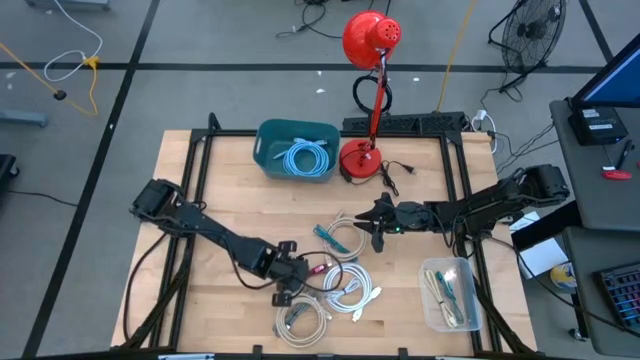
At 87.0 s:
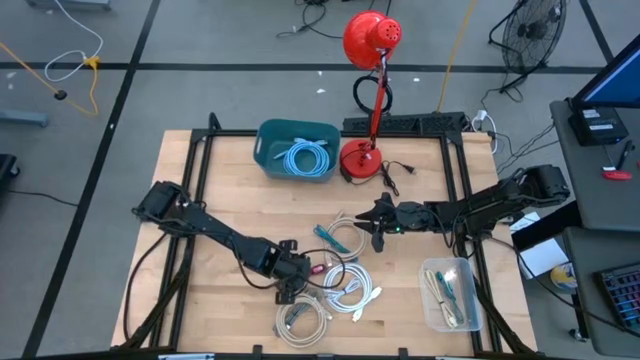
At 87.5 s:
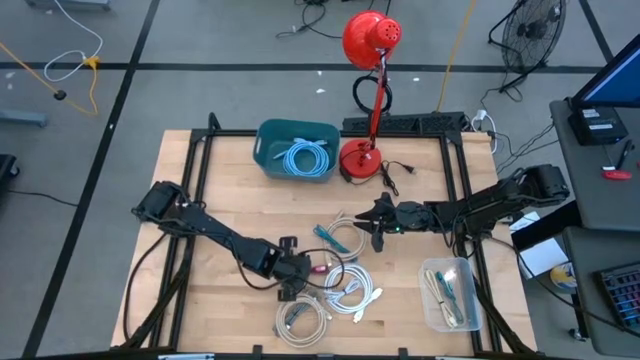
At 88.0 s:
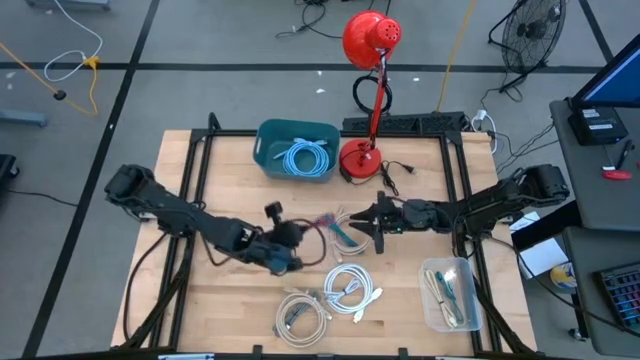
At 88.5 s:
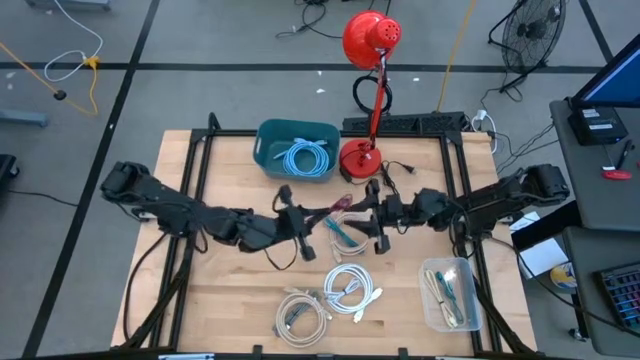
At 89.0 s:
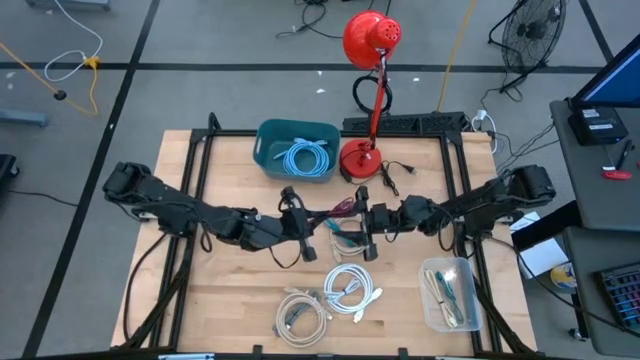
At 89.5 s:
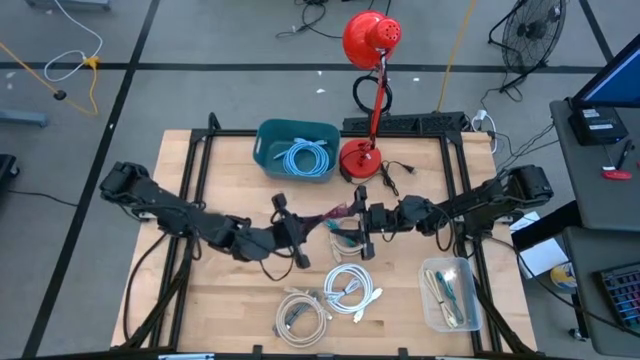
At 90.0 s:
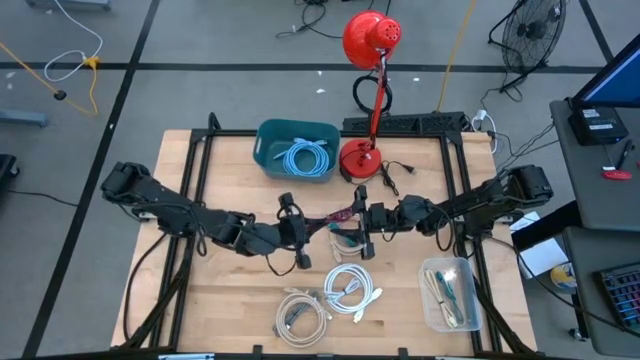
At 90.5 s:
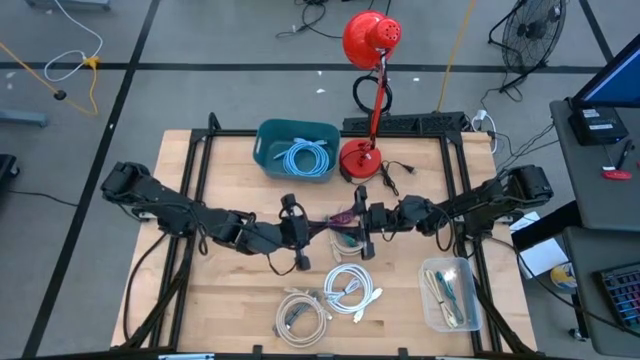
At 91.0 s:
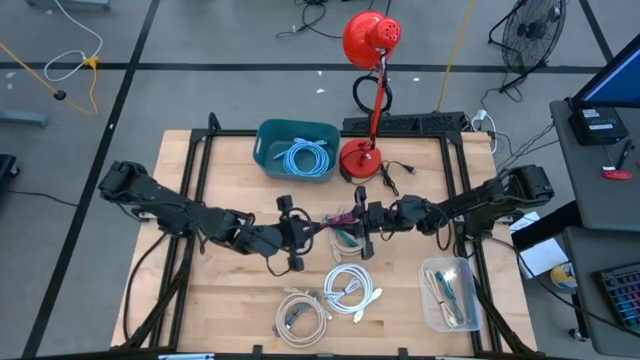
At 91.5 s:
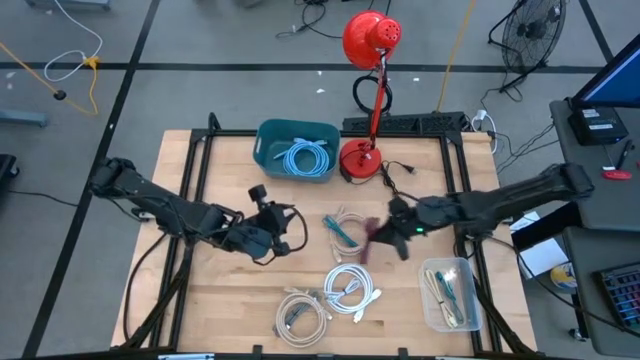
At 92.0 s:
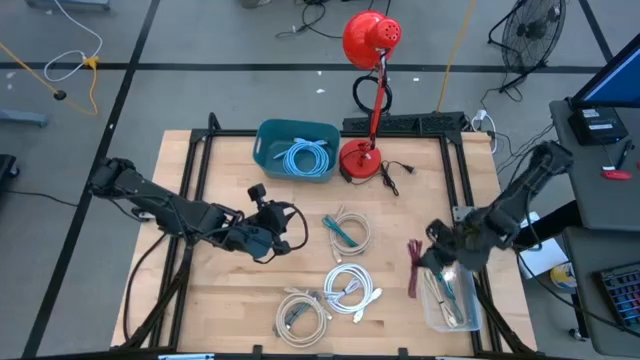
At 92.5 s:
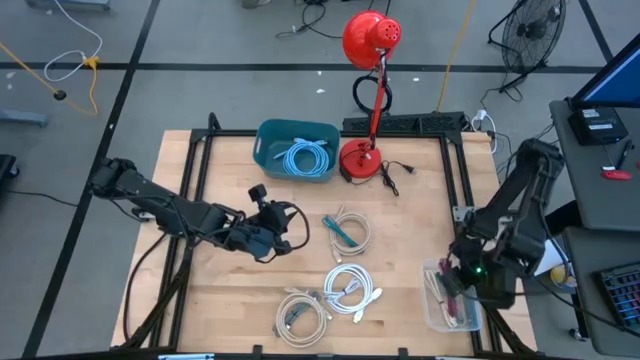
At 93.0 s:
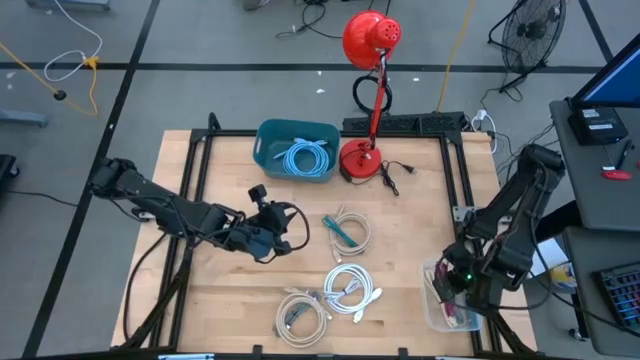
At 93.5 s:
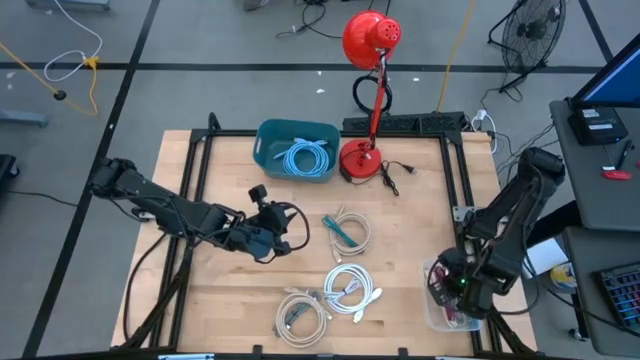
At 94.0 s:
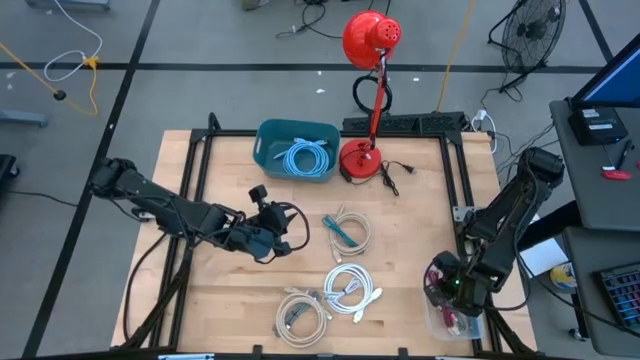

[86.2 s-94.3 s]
Task: Pick & Place USB Port
Put the red charger cable into the transparent bin

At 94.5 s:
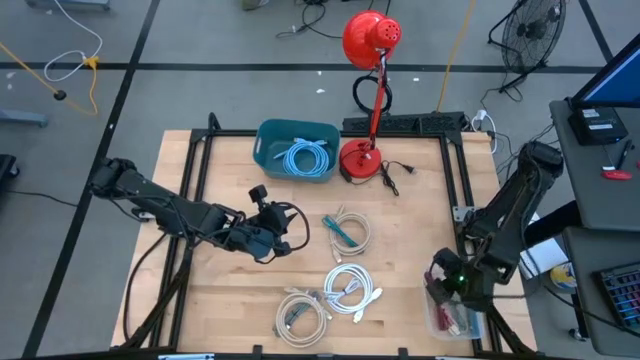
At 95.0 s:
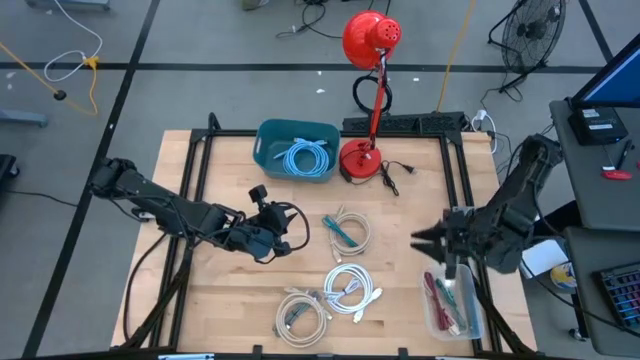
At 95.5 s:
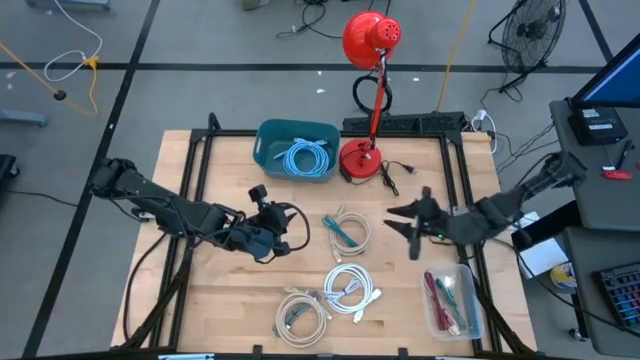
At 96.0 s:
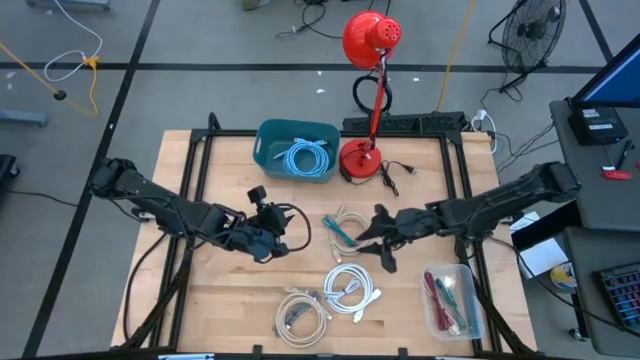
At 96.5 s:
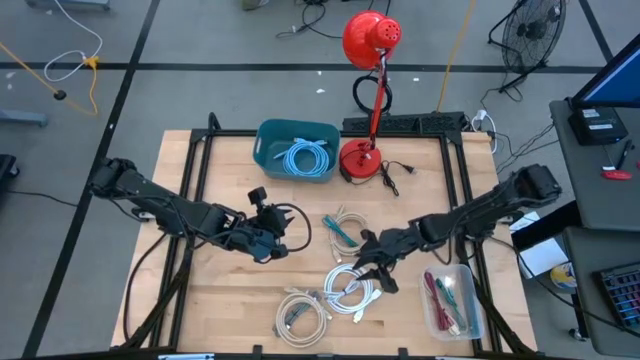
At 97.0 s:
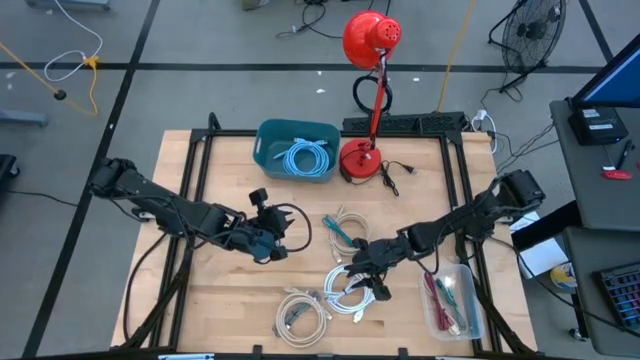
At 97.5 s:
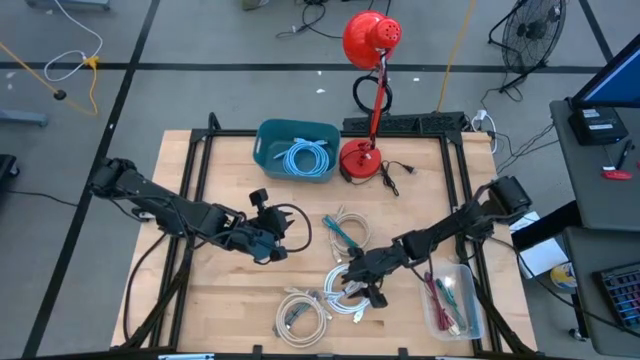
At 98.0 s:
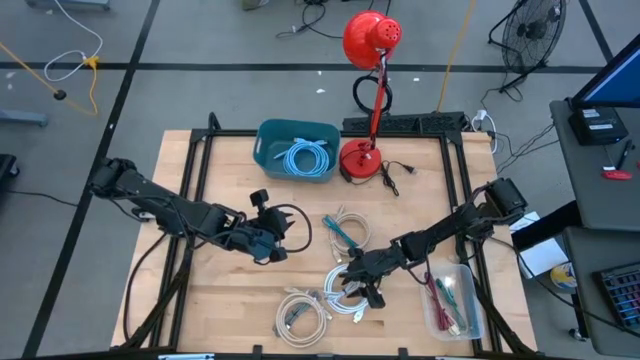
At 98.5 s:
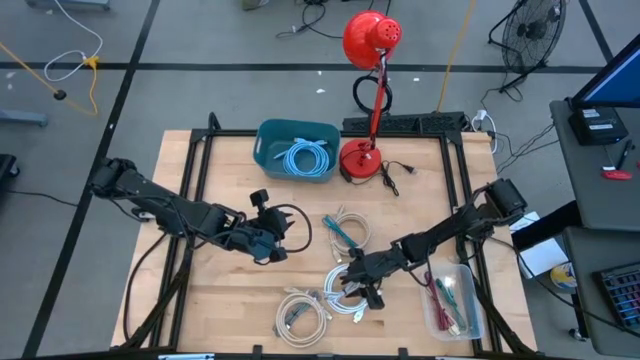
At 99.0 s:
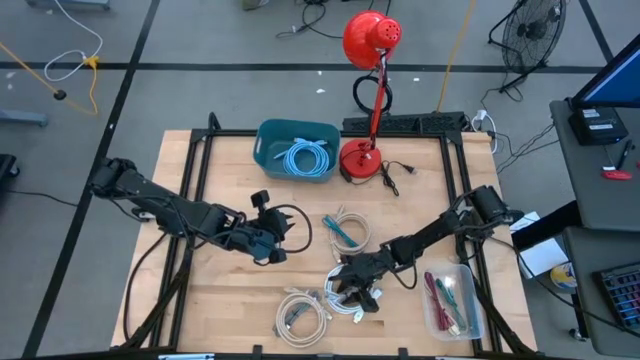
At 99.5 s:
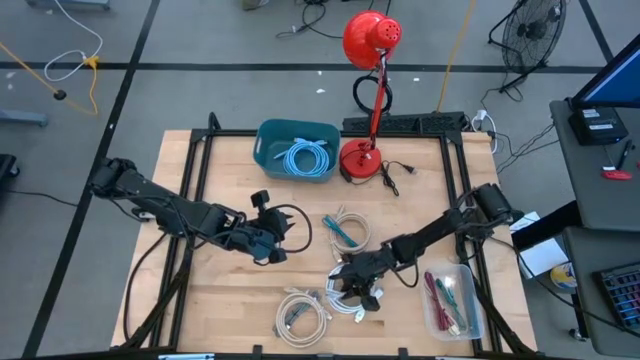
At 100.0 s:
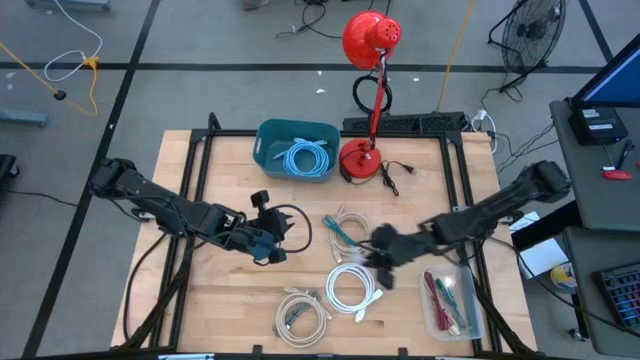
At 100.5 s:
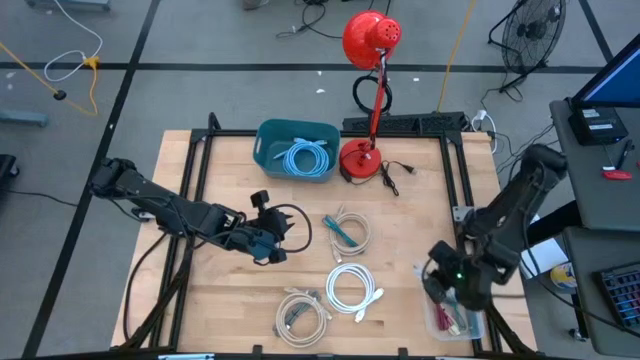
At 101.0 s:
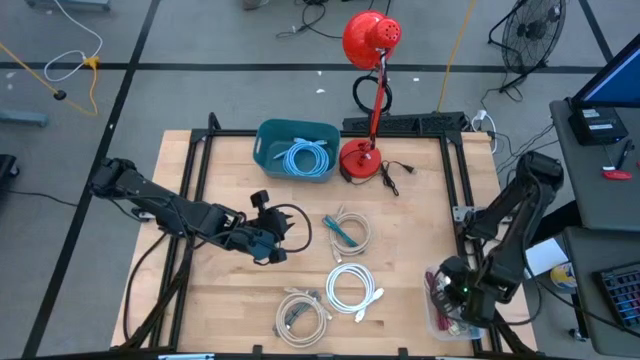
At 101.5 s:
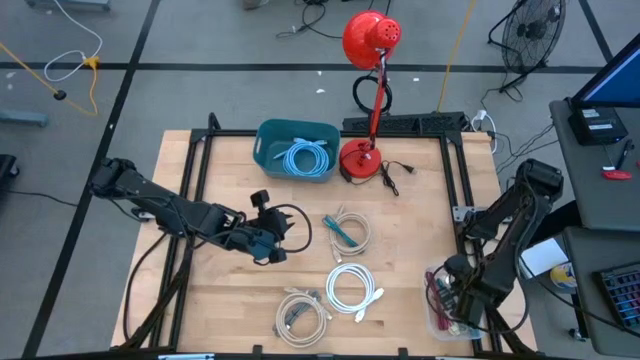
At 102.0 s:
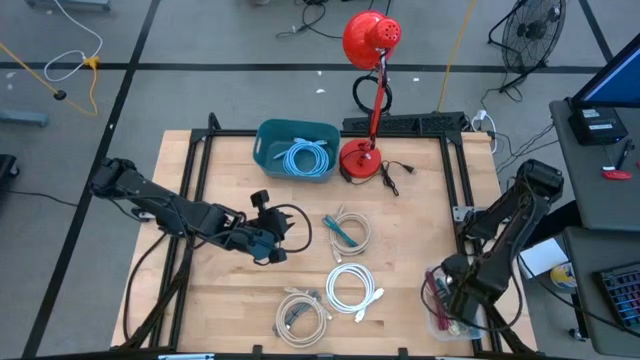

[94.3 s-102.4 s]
Put the white charger cable into the transparent bin

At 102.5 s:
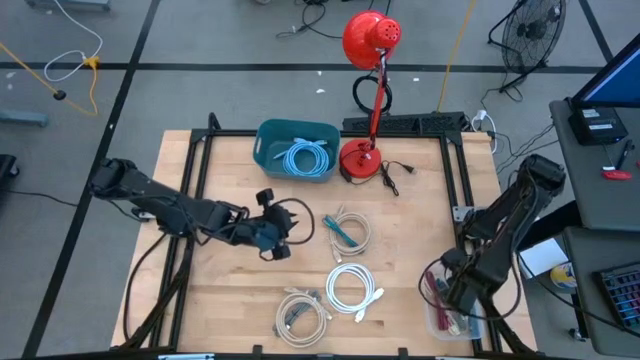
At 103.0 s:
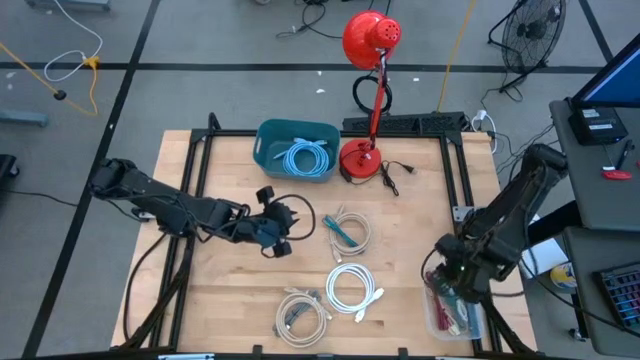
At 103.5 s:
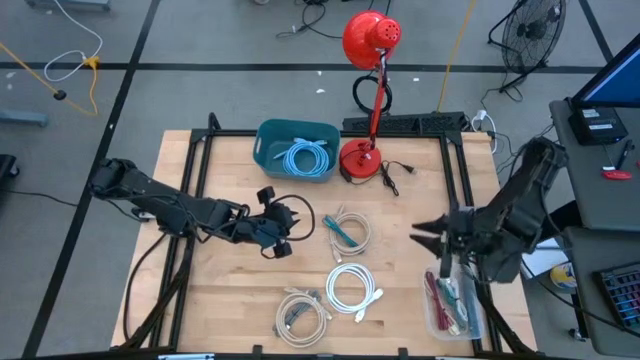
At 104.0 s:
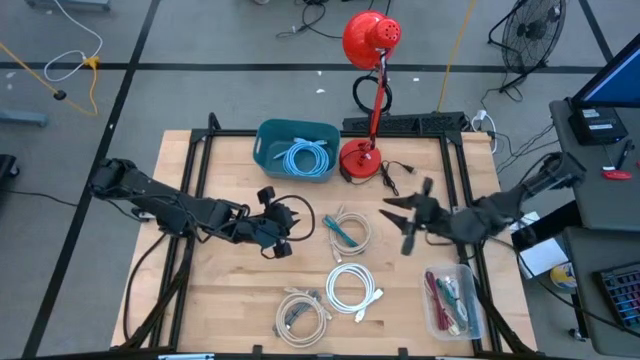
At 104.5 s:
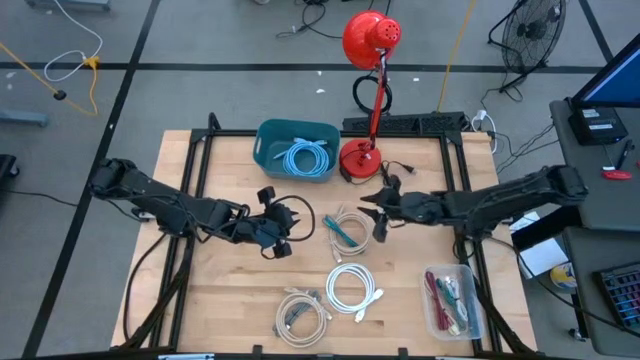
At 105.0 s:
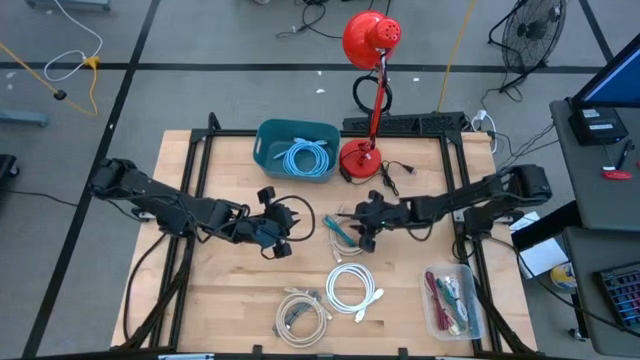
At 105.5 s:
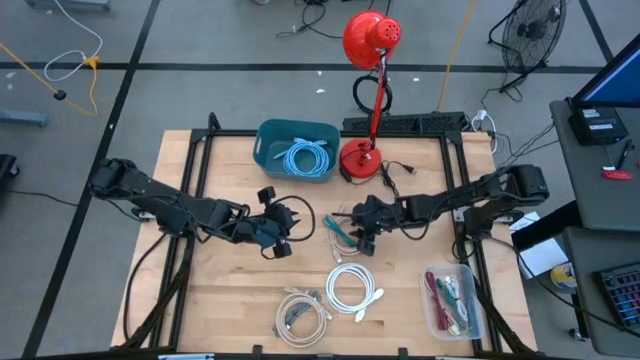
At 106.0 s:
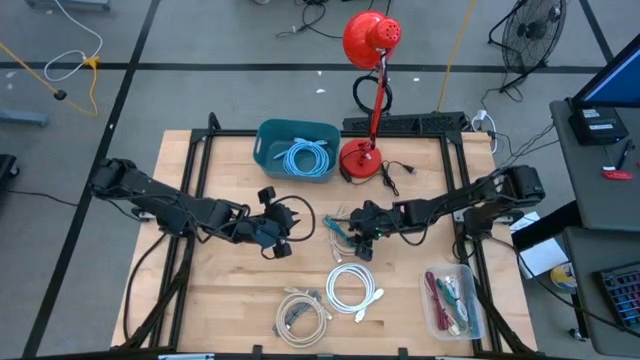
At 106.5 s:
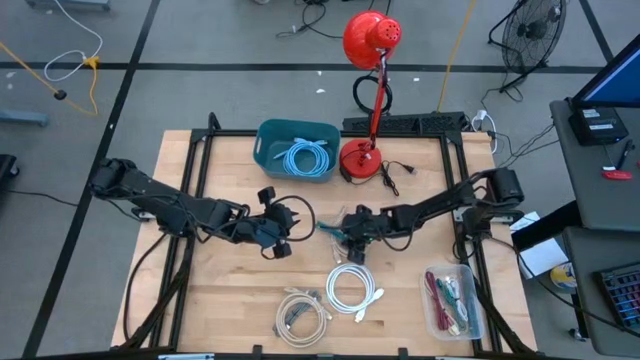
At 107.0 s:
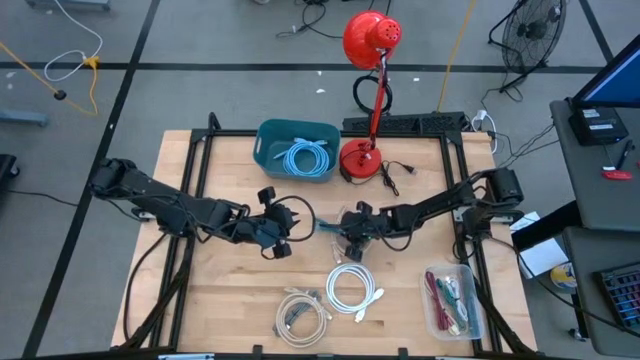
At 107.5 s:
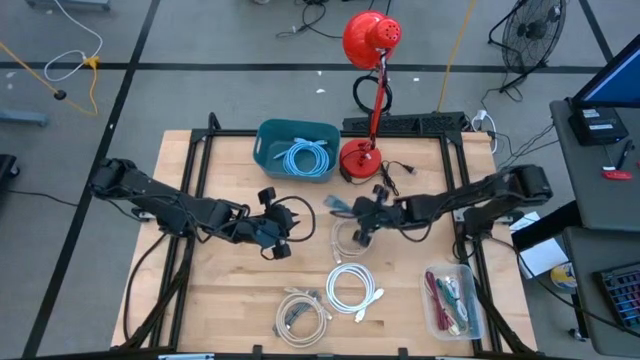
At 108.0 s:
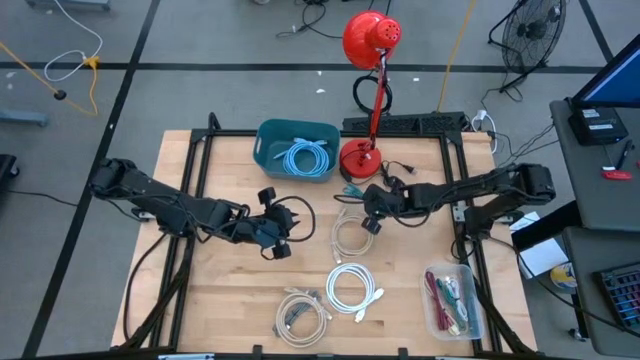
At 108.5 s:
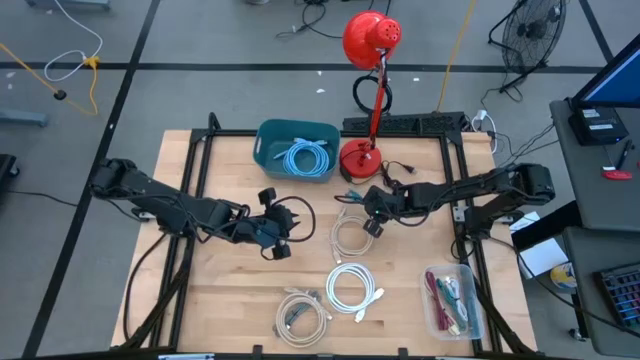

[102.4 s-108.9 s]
Move the blue charger cable to top right of the table
